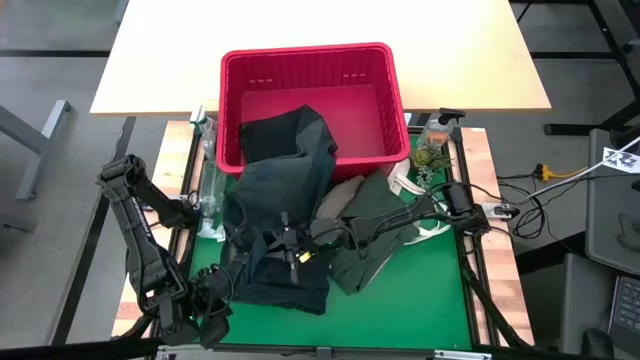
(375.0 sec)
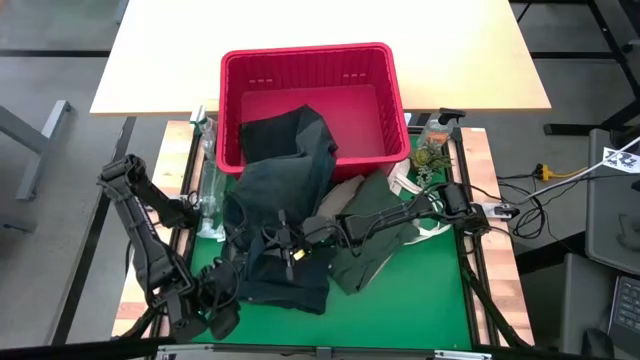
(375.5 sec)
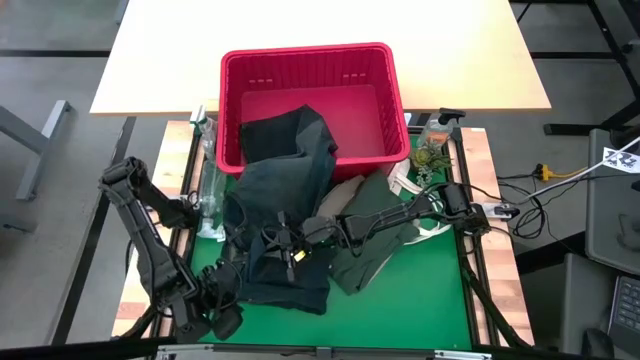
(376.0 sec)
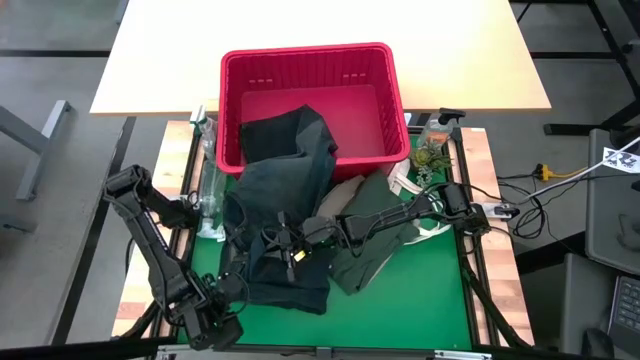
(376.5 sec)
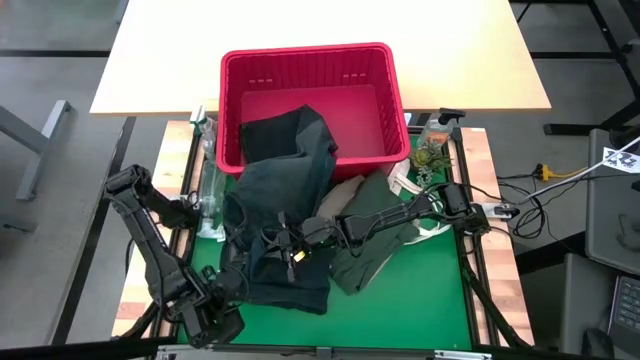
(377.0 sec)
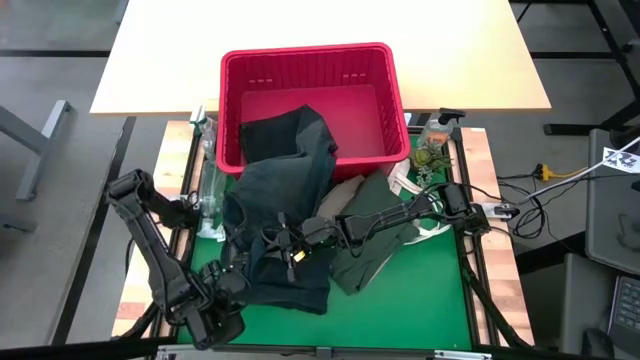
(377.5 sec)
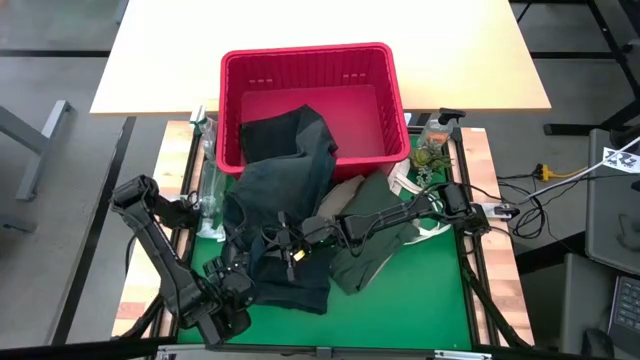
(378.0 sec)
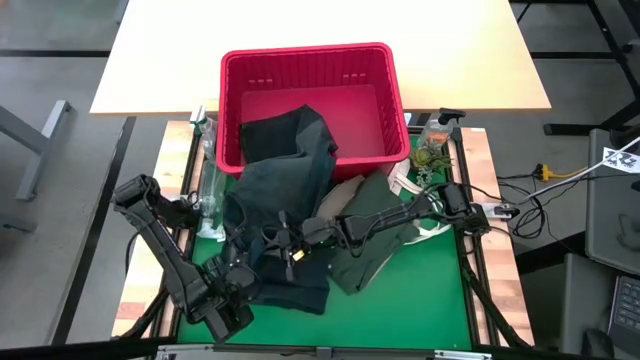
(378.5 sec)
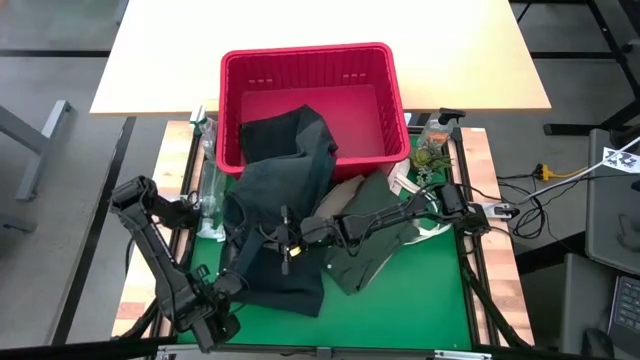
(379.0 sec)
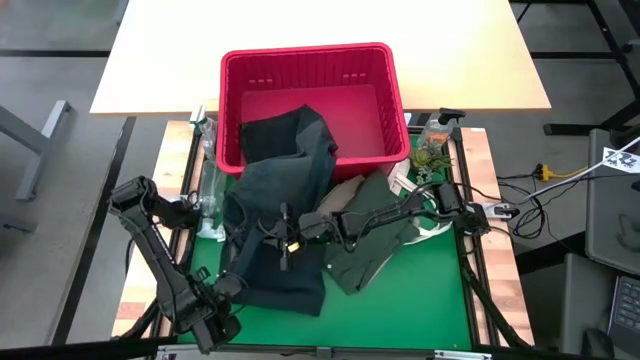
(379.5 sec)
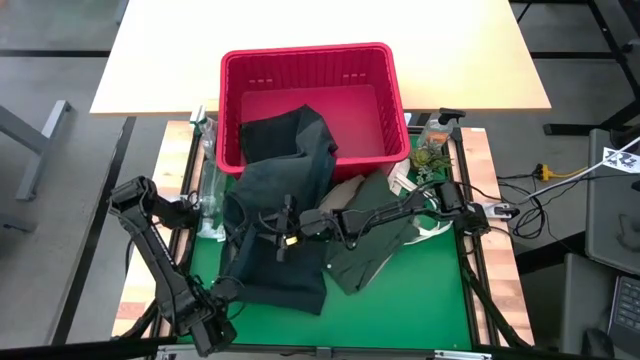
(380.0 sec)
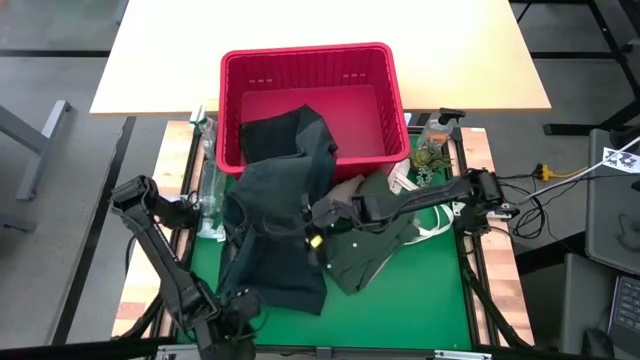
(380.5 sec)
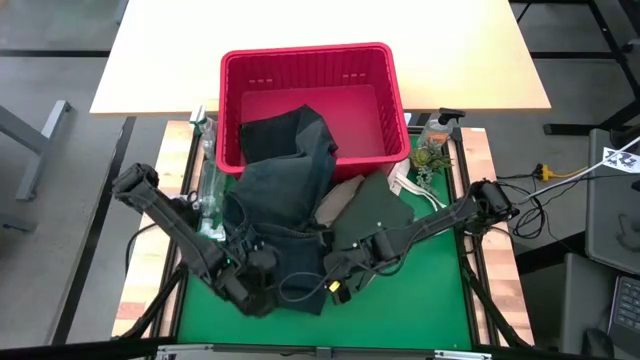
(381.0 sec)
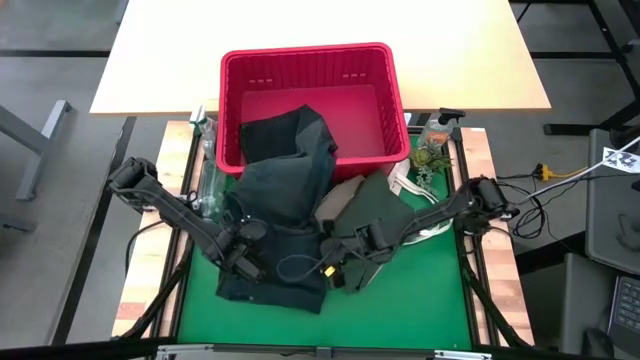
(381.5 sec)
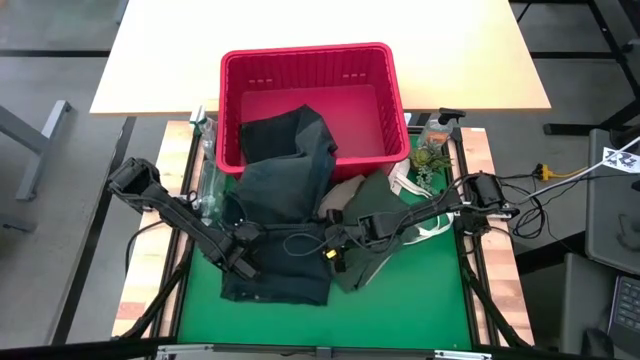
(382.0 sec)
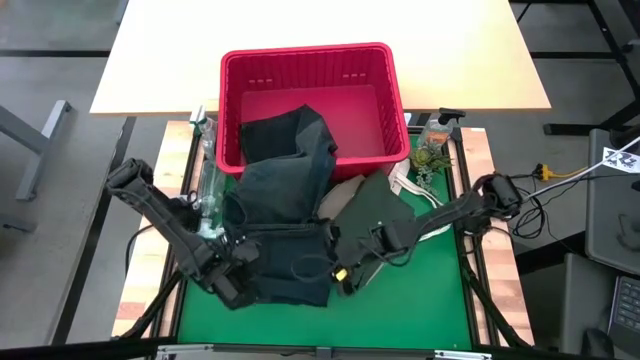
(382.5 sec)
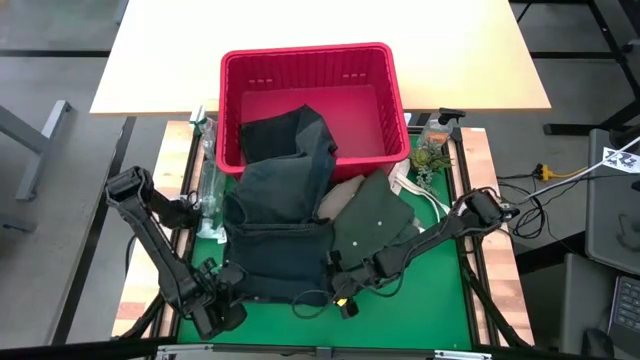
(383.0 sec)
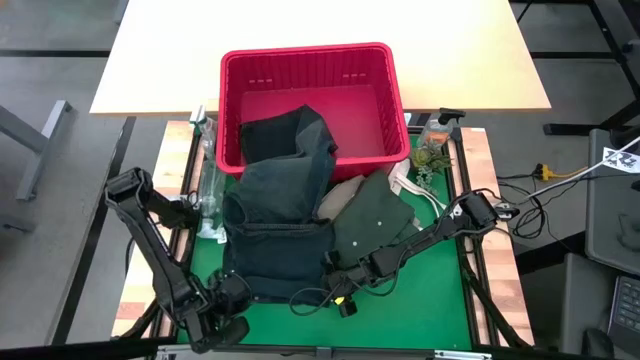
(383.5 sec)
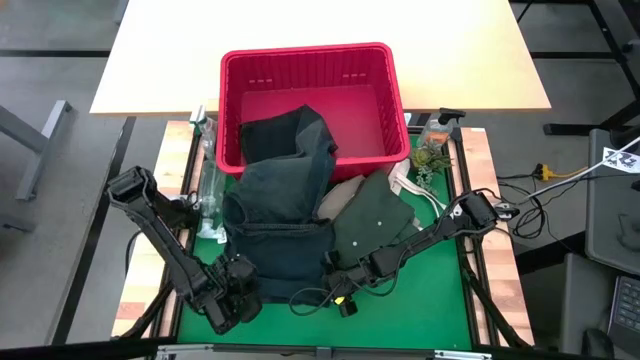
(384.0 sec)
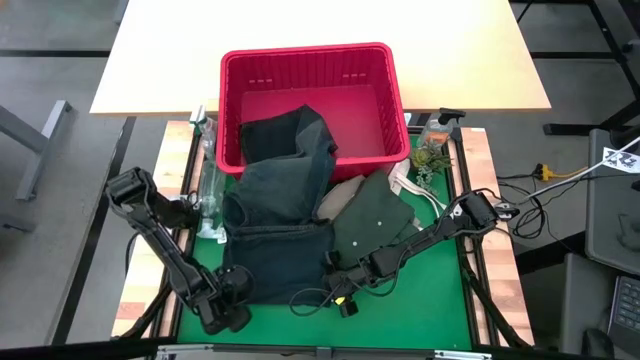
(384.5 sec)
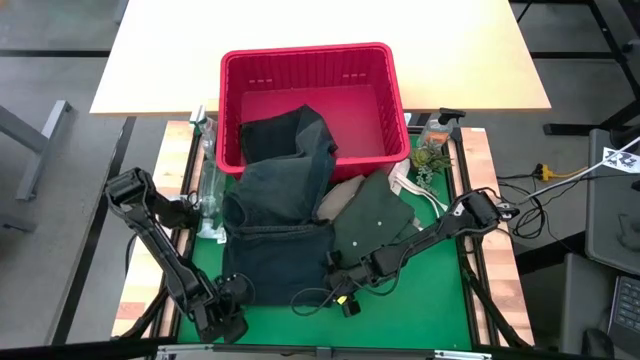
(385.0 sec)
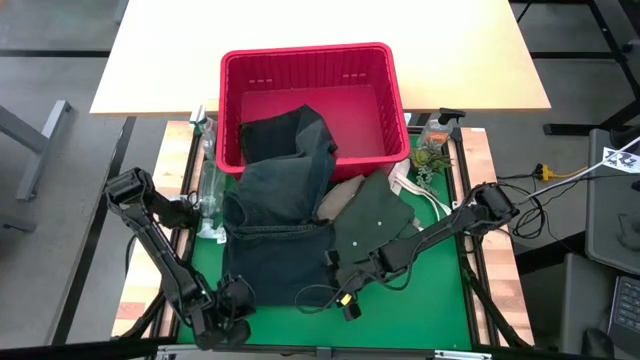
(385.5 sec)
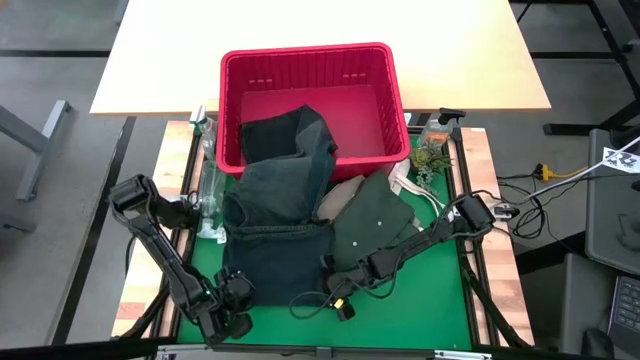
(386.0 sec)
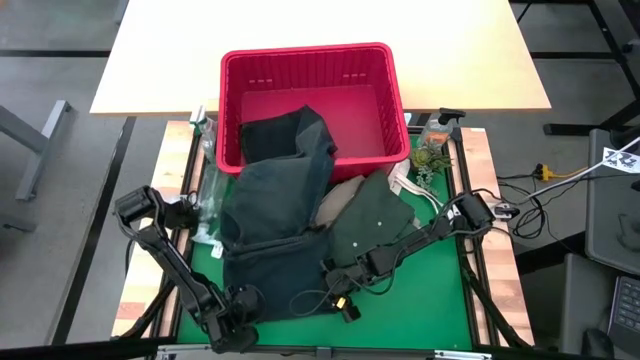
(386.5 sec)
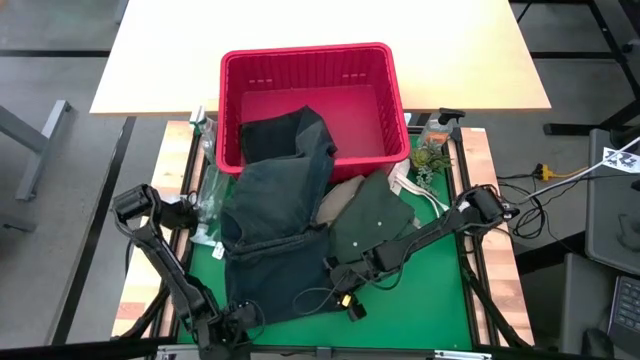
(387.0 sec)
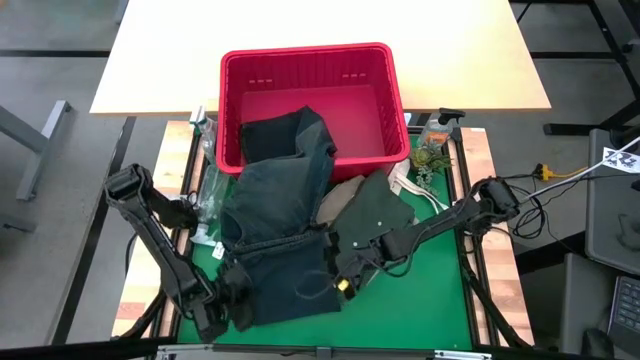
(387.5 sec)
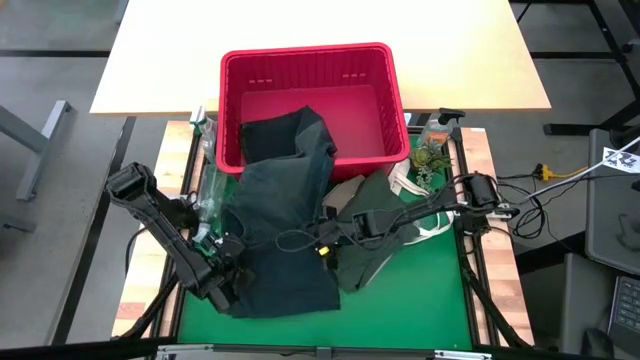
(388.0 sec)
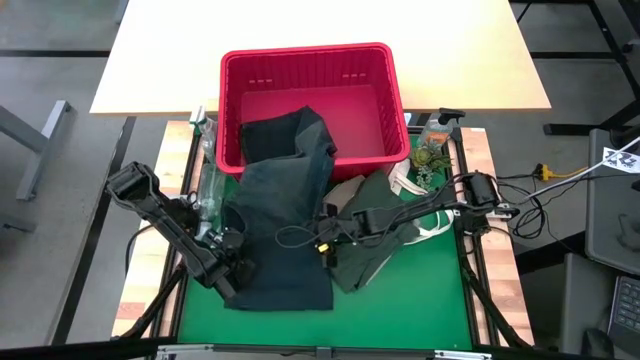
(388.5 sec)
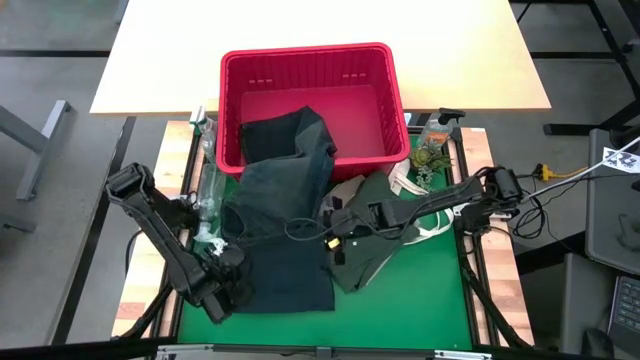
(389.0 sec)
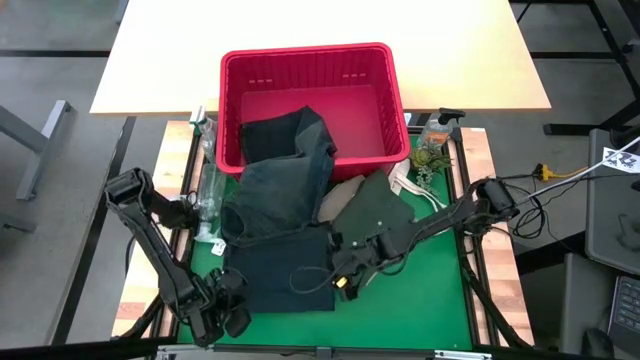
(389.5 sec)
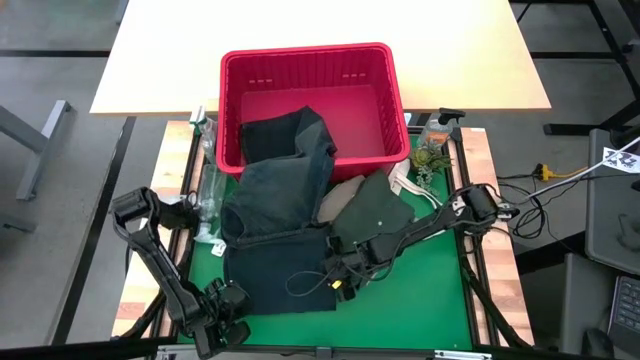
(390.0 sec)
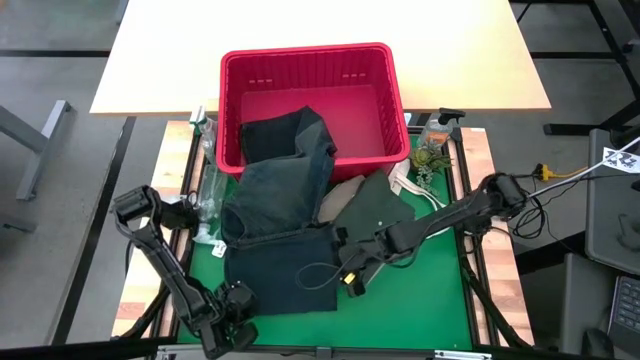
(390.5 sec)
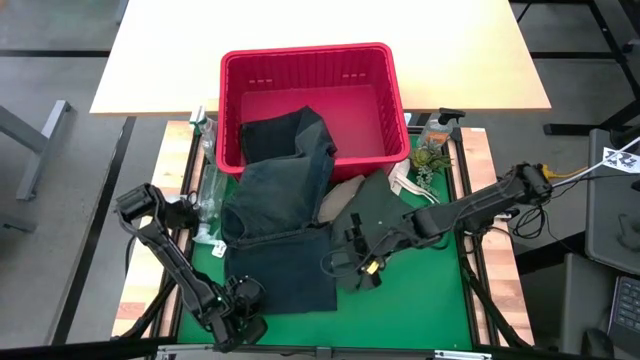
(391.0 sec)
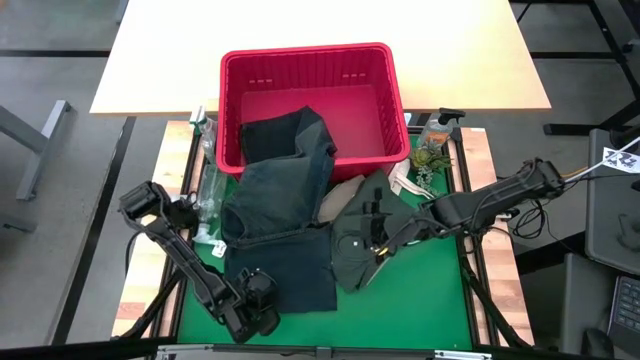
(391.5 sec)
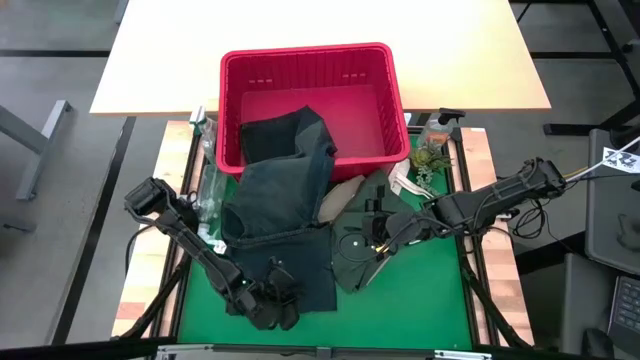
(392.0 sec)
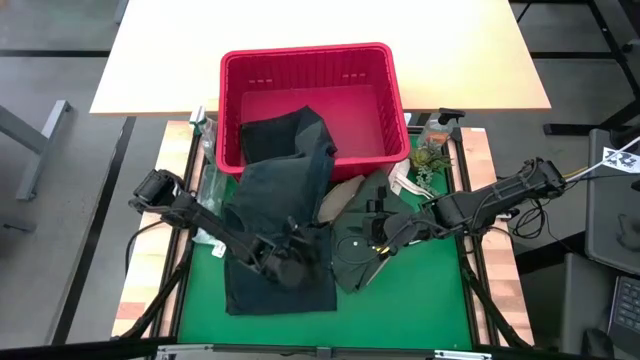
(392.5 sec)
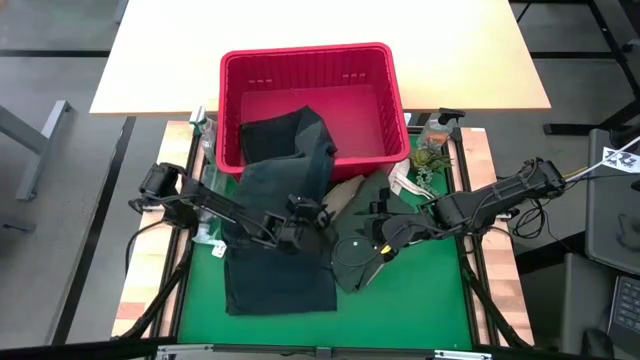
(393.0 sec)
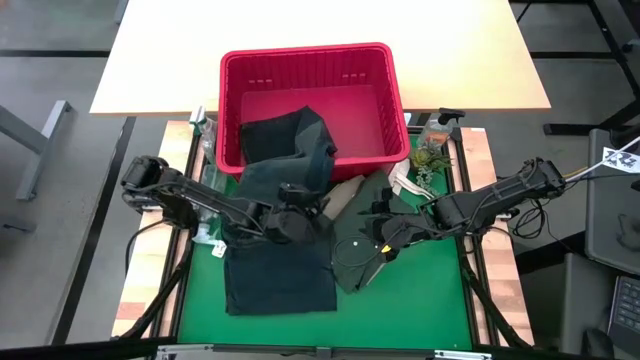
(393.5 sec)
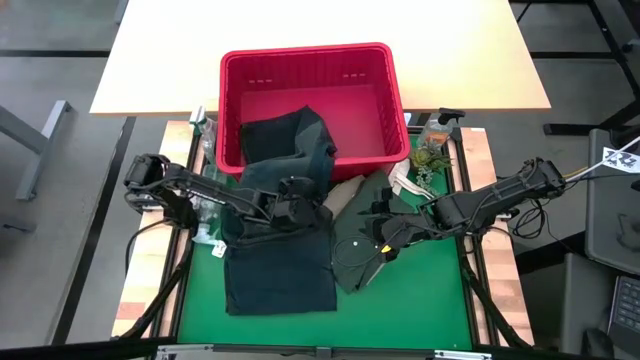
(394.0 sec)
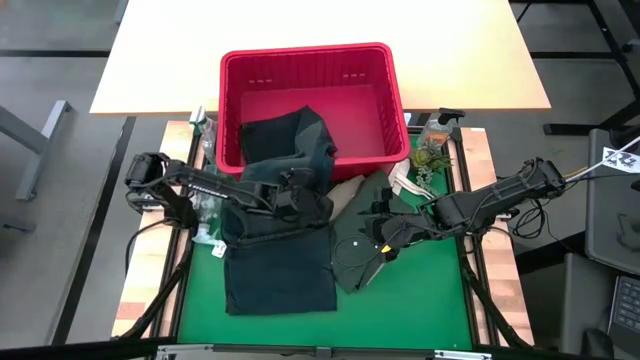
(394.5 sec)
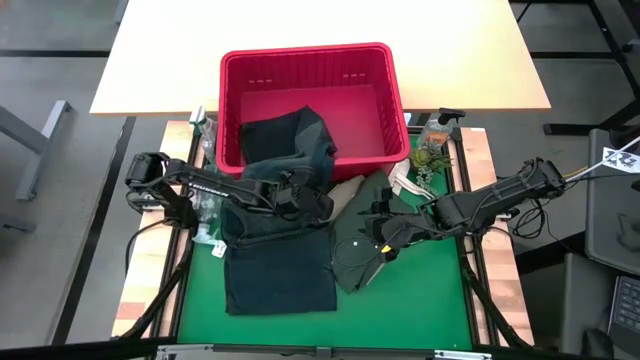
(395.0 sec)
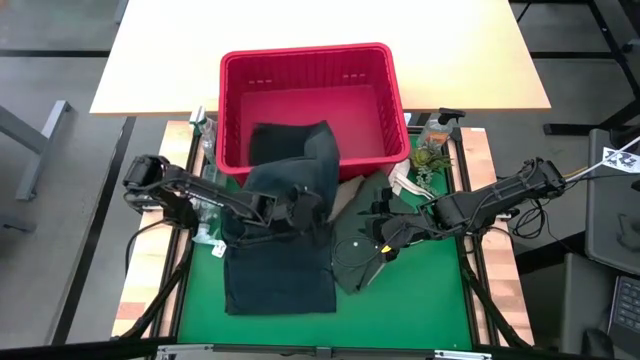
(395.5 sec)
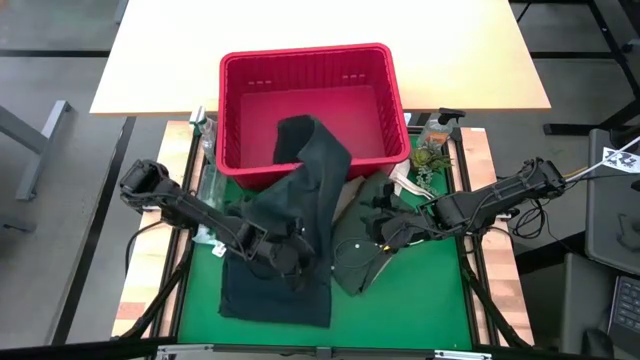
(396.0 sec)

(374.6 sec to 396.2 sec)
Task: Fold laundry
Fold the dark blue pants
